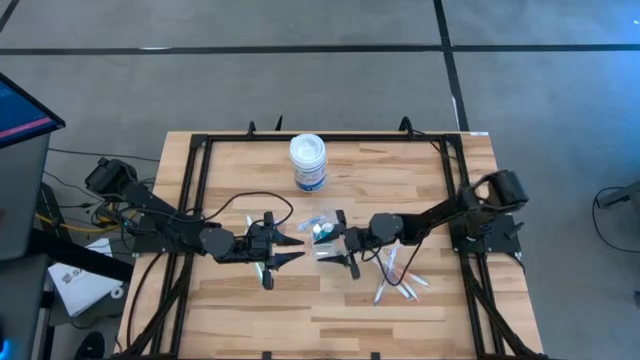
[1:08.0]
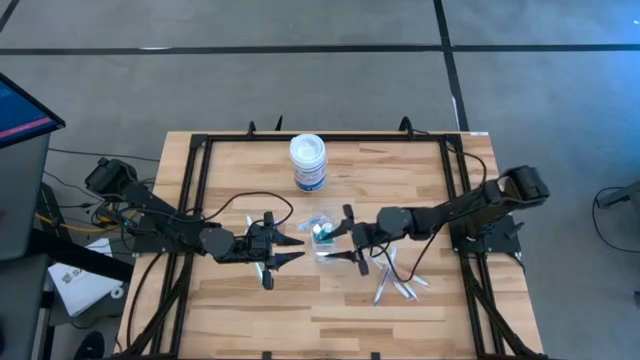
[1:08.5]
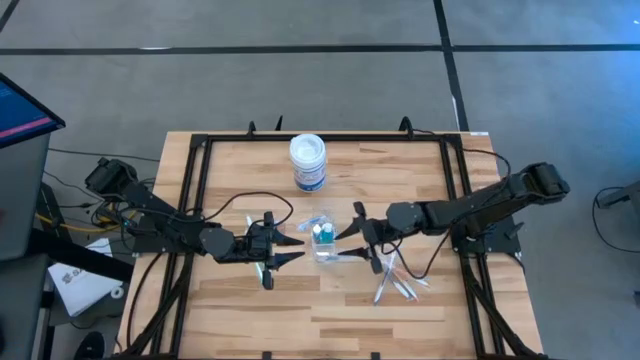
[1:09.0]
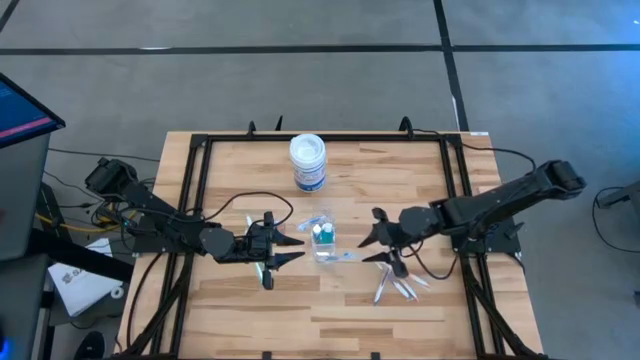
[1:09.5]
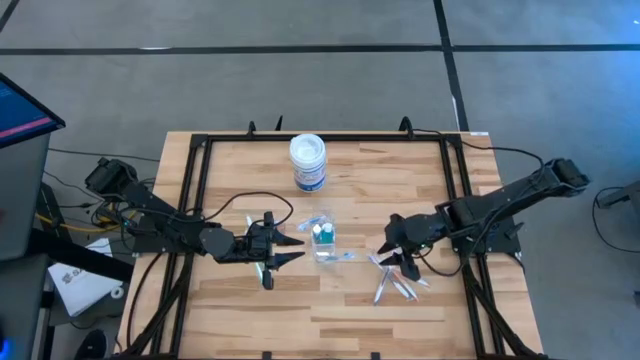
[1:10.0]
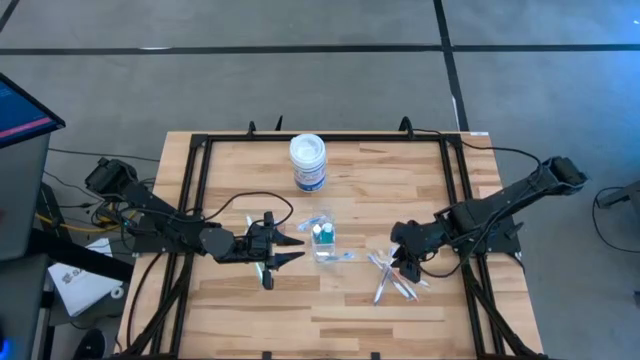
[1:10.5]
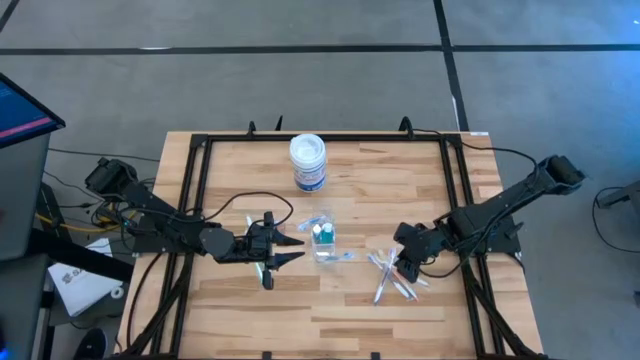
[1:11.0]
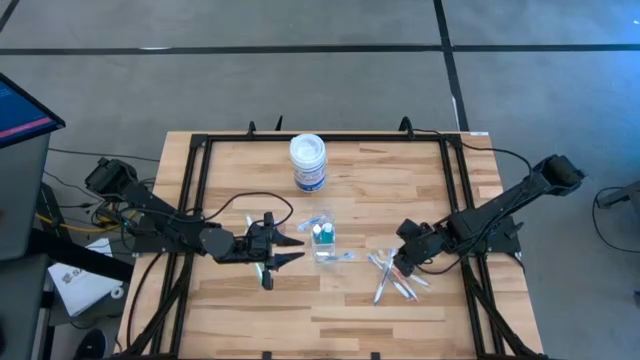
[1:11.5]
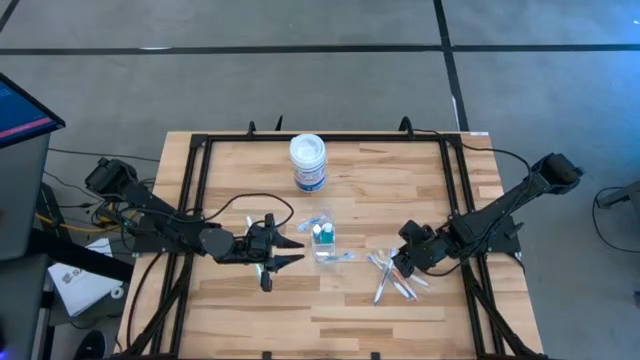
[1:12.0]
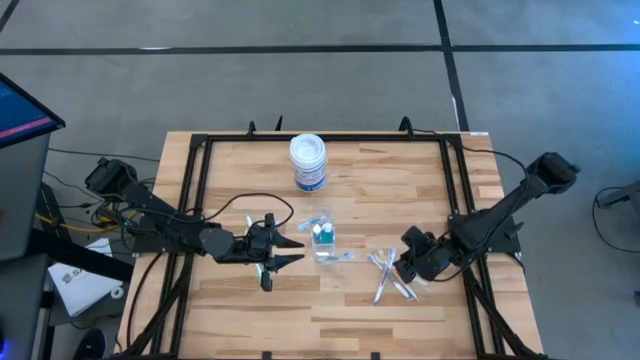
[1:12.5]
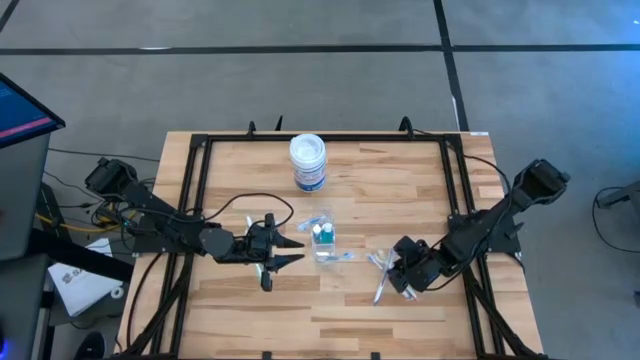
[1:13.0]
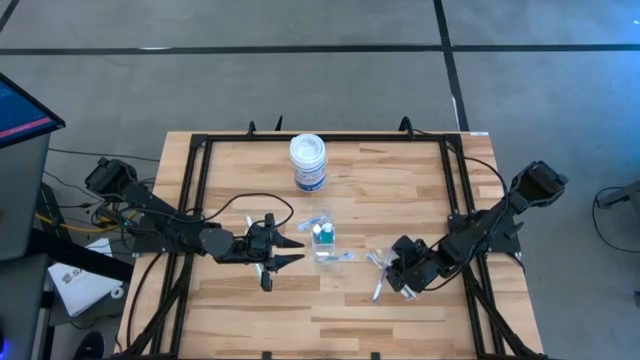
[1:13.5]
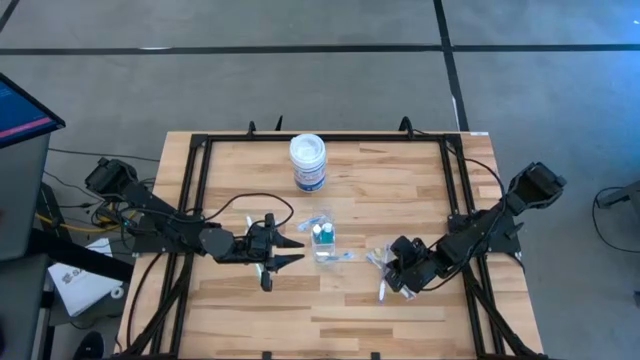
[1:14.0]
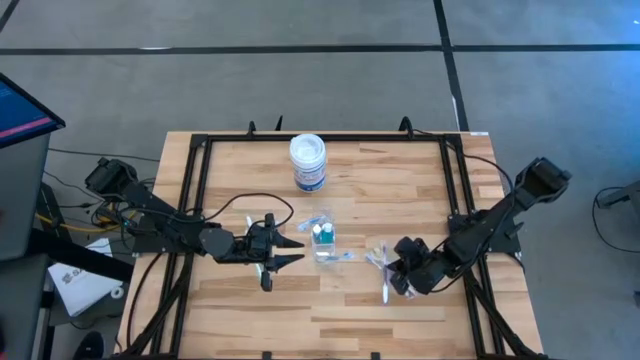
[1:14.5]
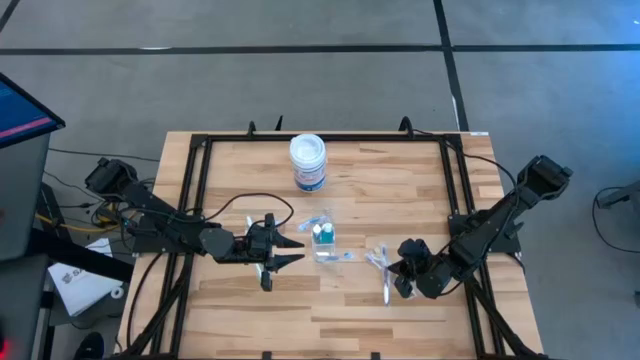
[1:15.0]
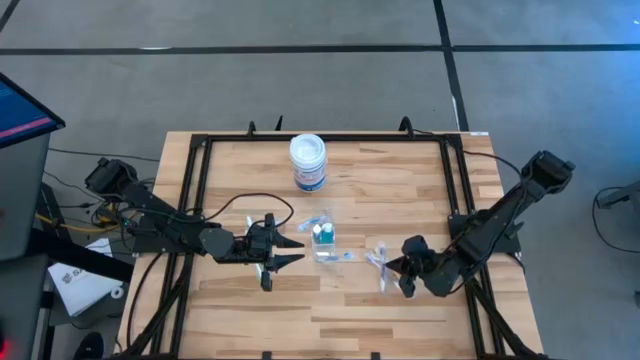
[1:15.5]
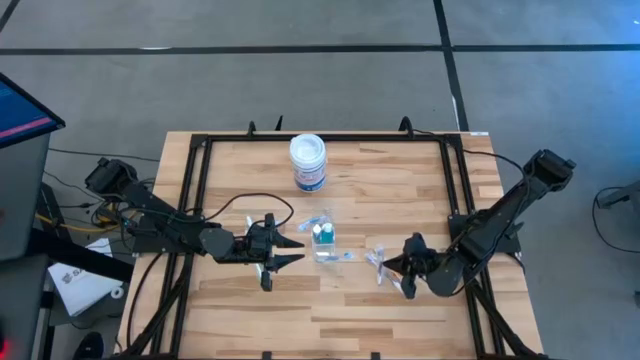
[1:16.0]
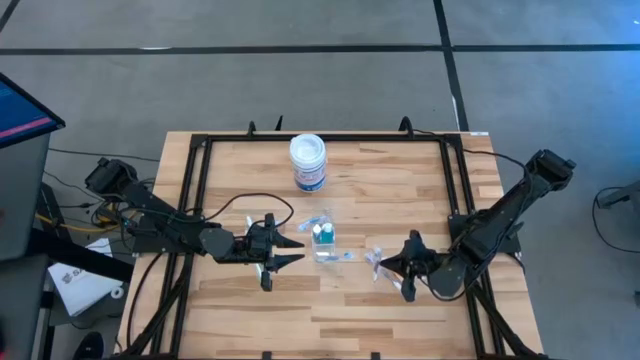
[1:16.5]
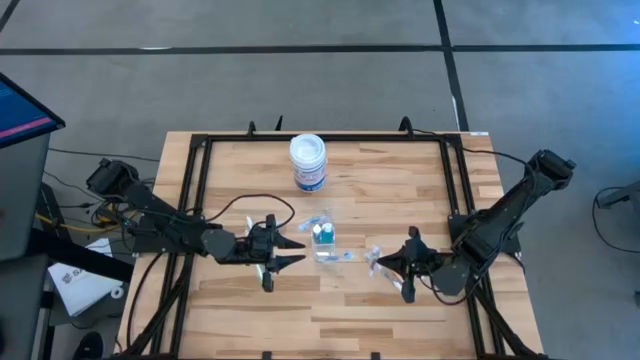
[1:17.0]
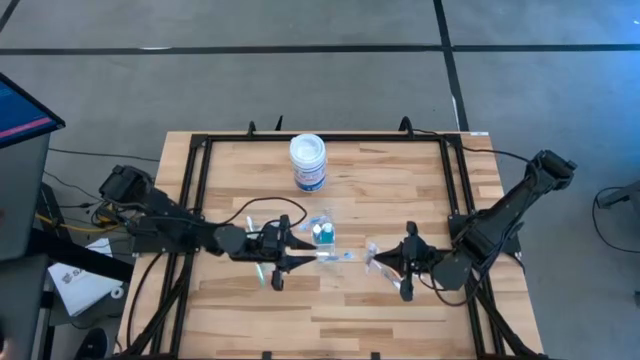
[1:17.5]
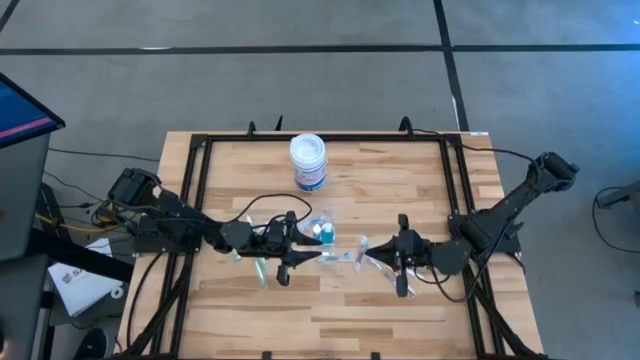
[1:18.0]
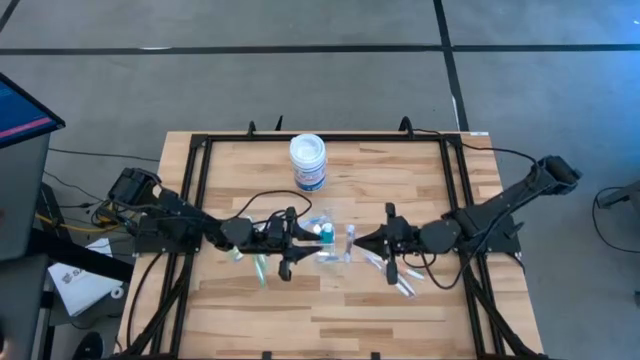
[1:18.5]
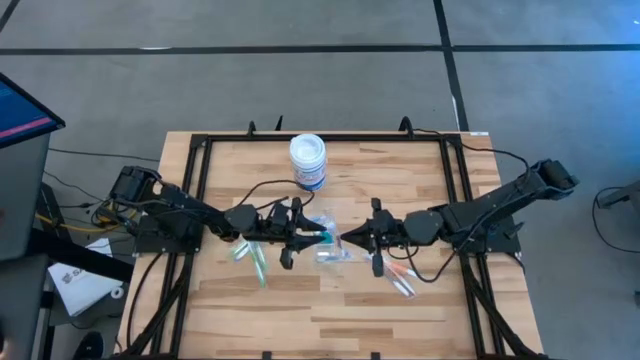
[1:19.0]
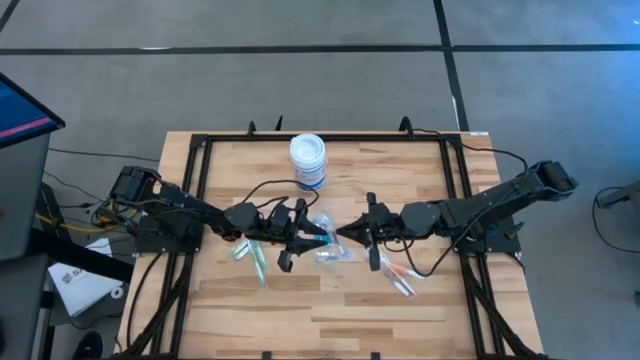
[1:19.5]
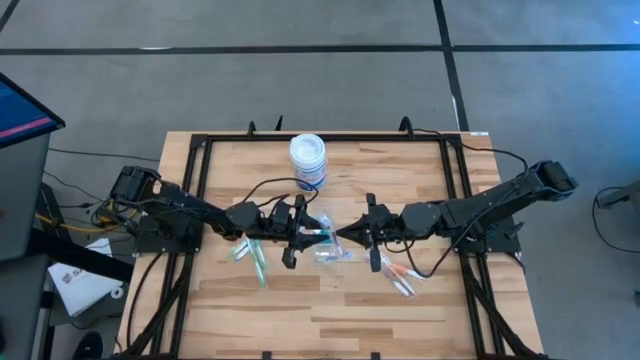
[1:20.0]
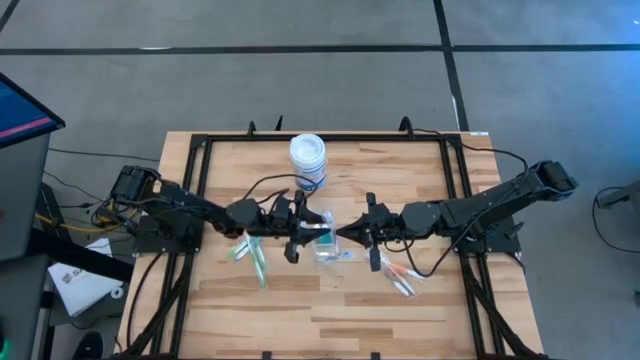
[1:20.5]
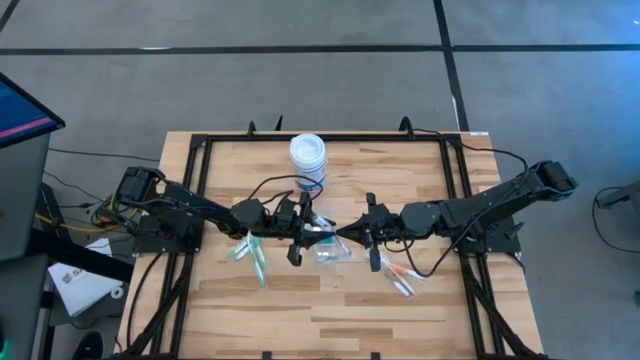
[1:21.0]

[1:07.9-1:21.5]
Task: Pick & Place toothbrushing station
Put the right purple toothbrush into the Transparent organizer
